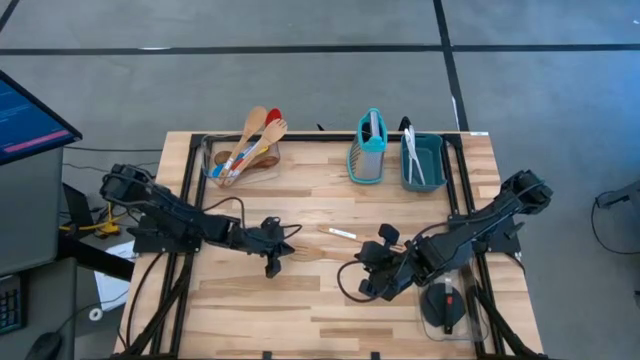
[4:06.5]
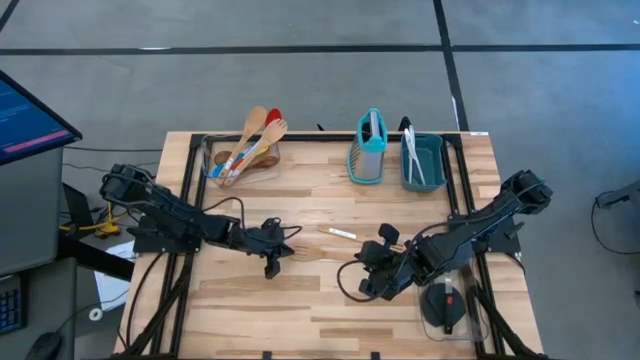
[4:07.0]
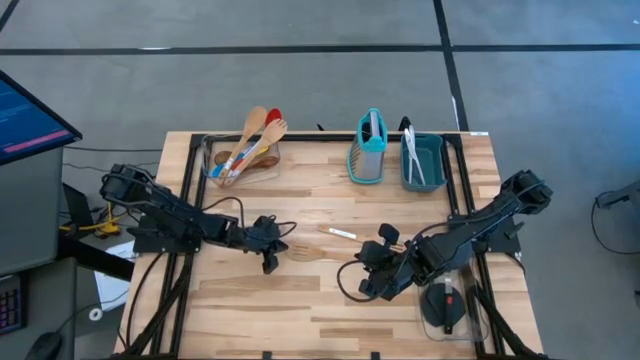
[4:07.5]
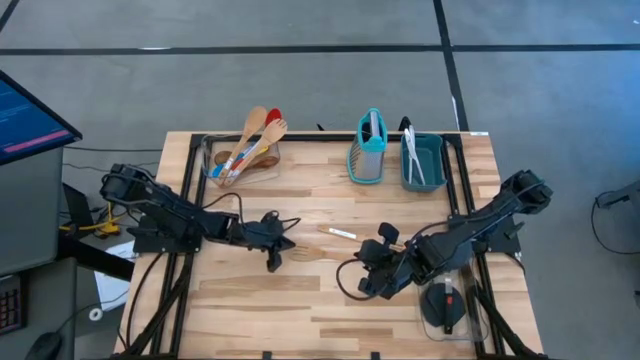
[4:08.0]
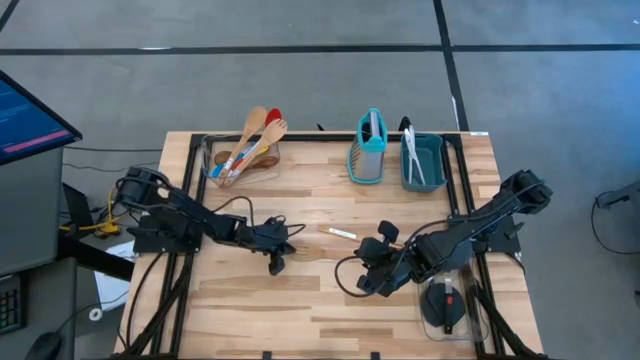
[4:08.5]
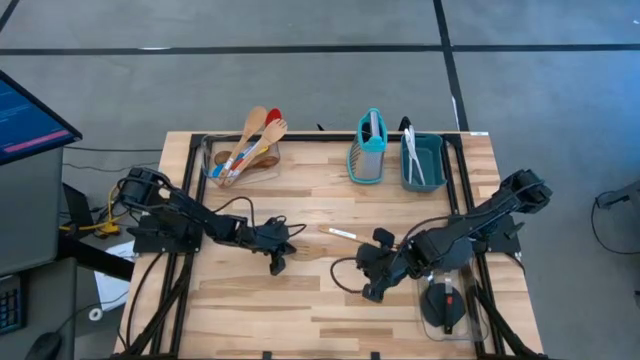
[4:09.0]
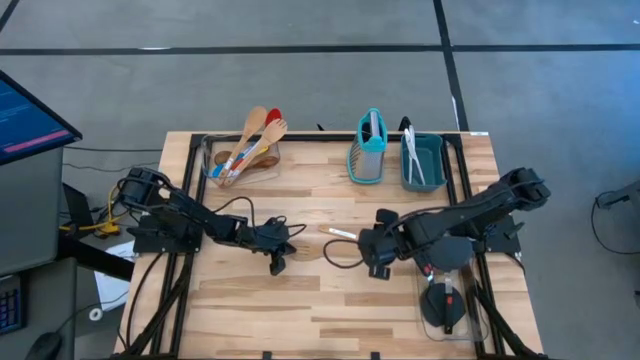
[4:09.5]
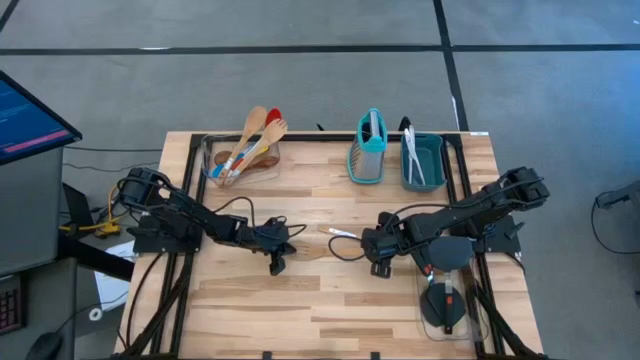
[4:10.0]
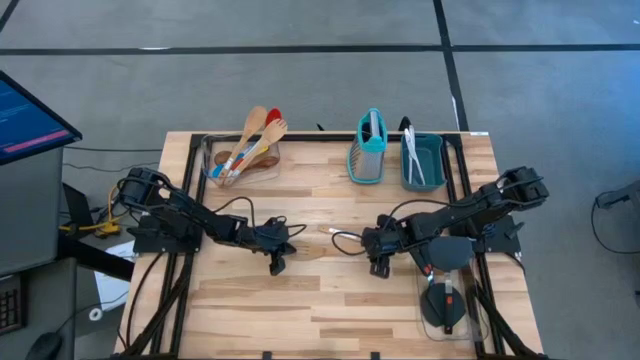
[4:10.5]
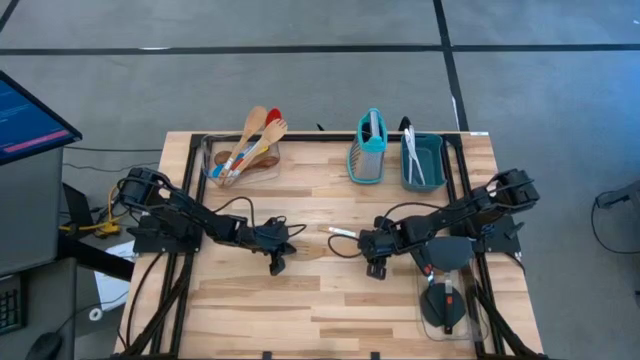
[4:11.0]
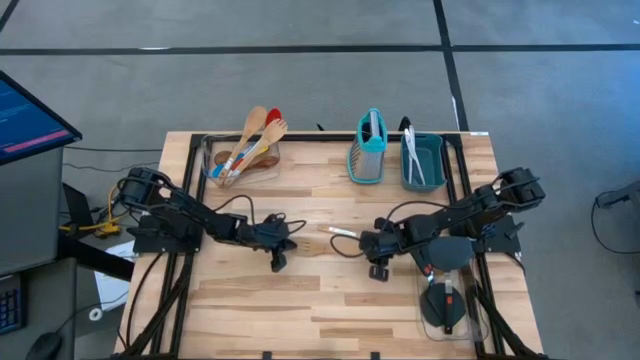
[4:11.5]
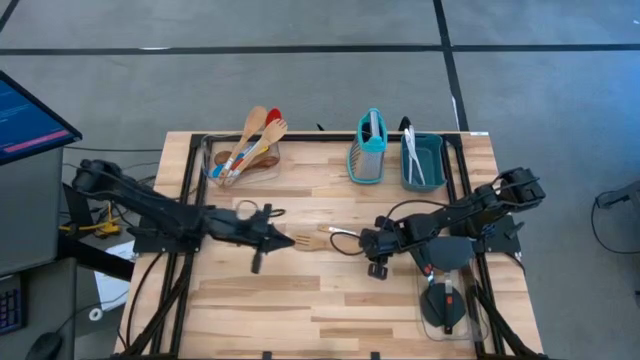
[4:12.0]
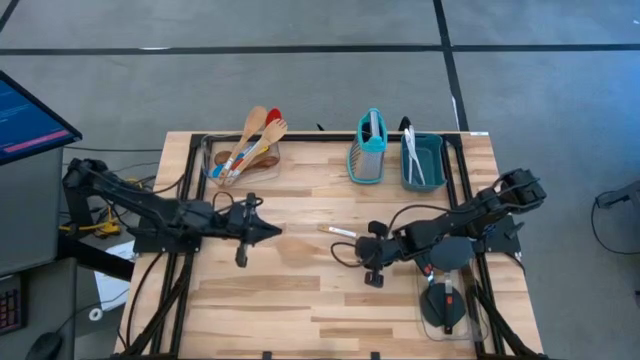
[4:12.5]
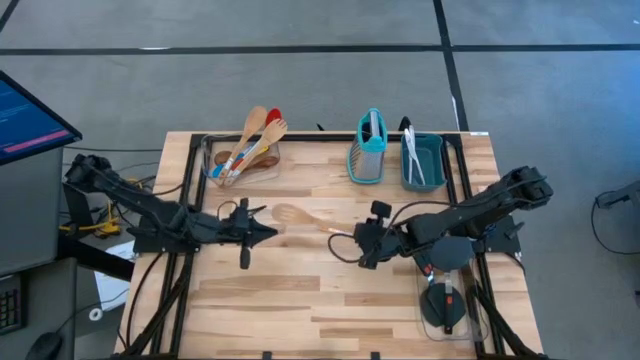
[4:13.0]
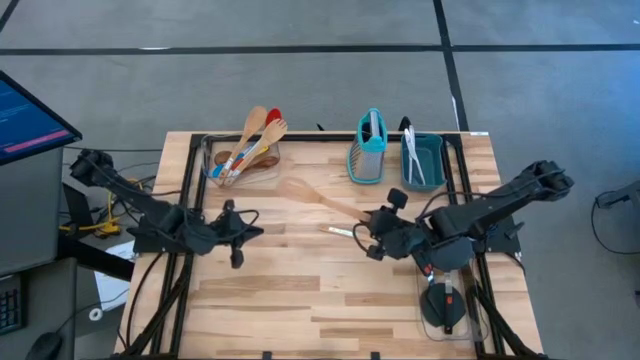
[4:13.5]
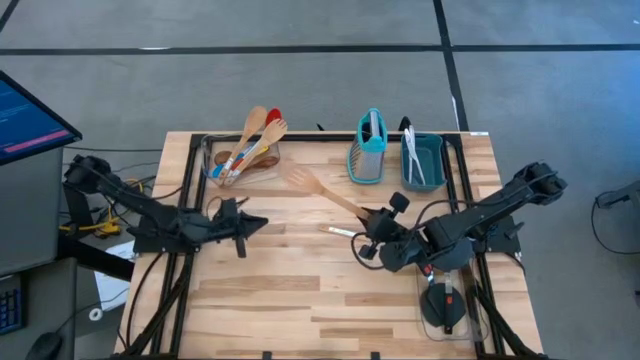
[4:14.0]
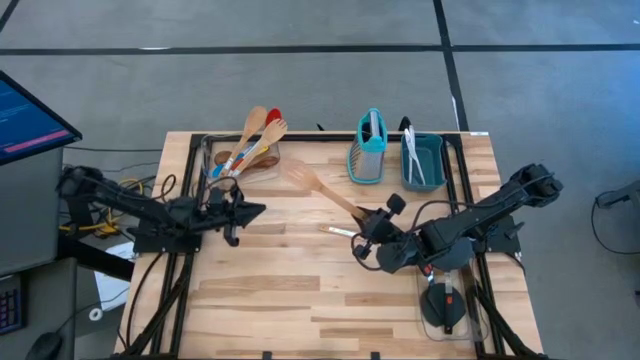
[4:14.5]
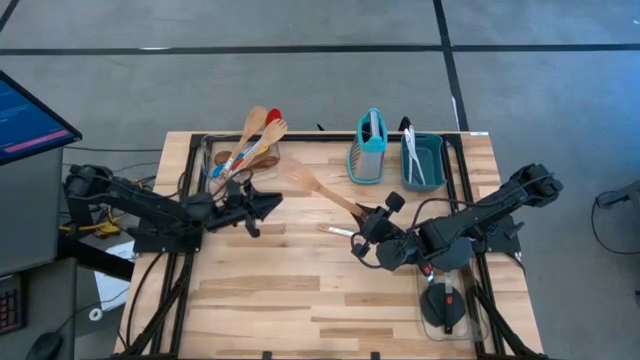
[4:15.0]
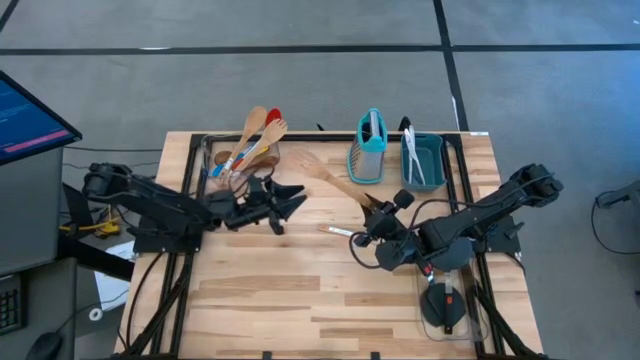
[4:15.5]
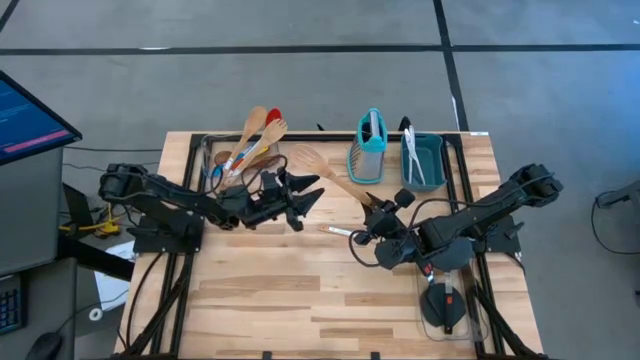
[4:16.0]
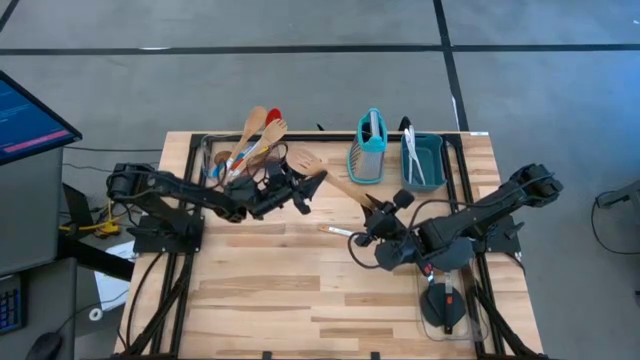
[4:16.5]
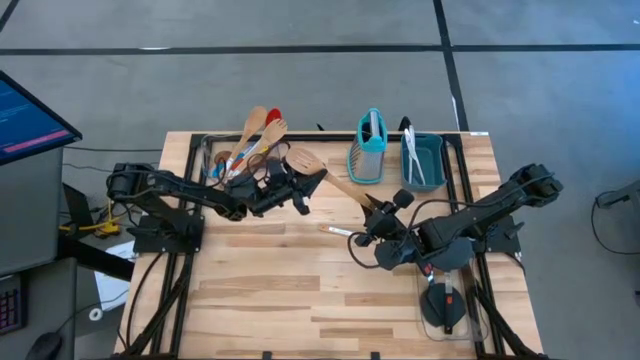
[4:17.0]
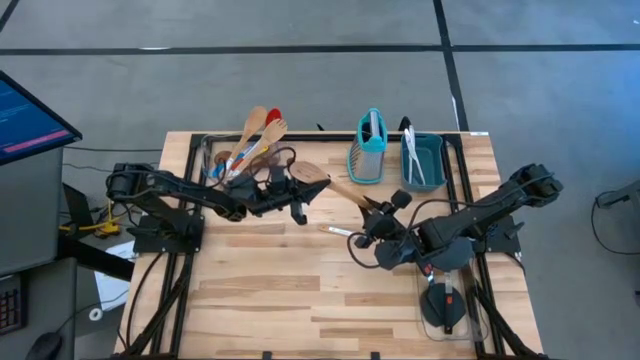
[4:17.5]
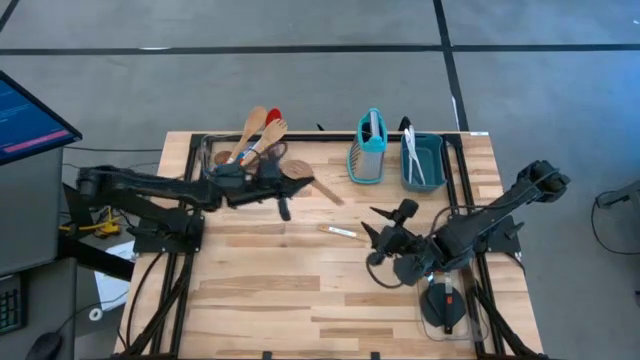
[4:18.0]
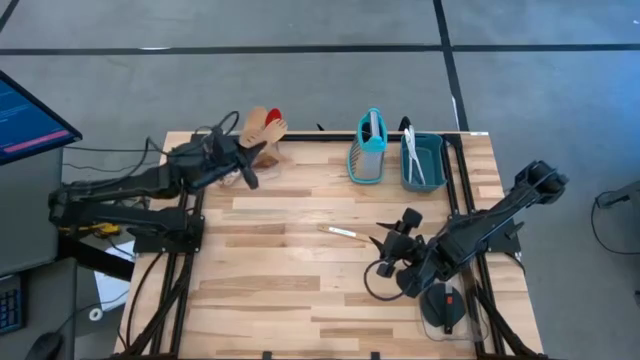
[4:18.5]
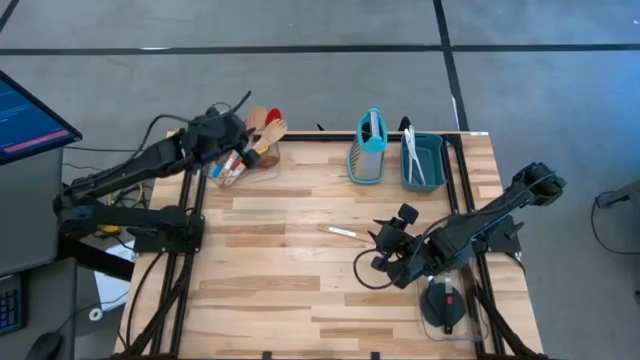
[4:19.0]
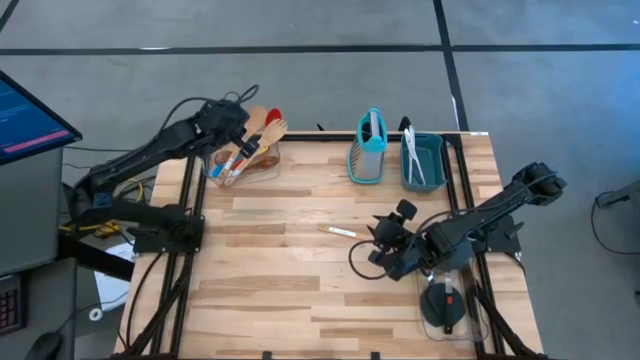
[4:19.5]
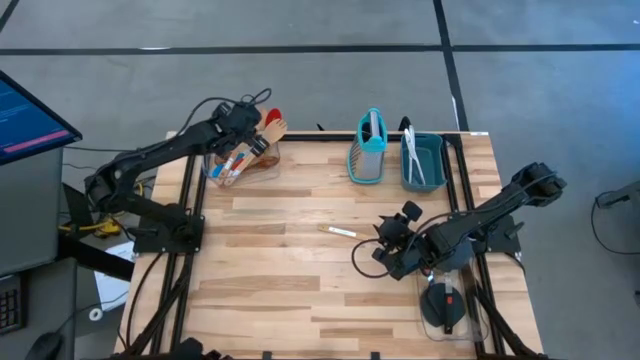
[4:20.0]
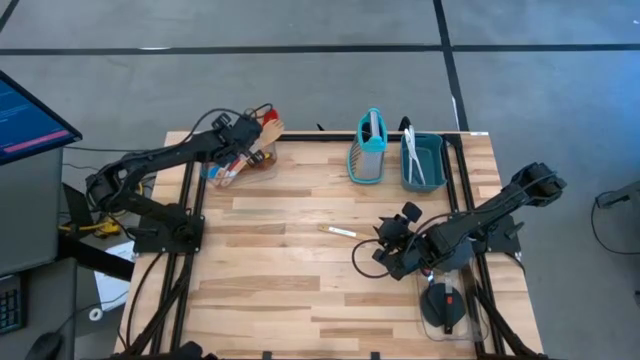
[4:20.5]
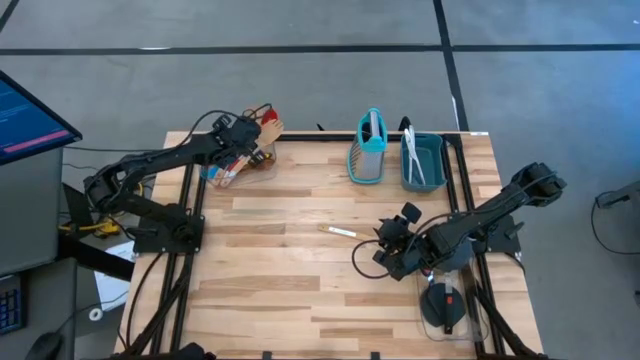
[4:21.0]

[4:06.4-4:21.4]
Task: Pick & Place Kitchen Items
Put the bottom wooden slotted spoon into the left transparent bin

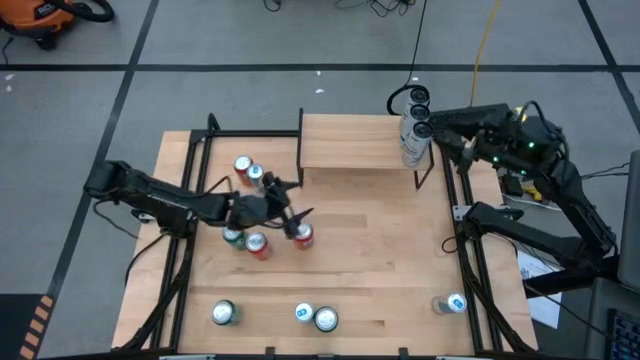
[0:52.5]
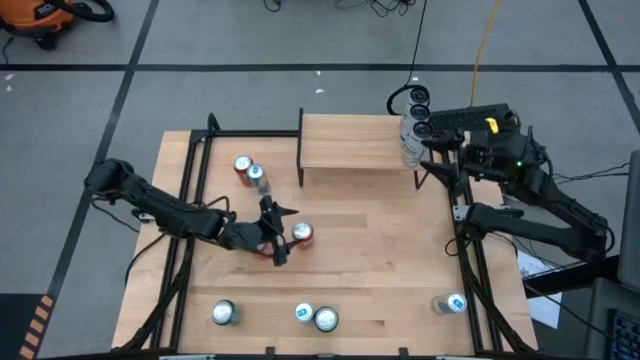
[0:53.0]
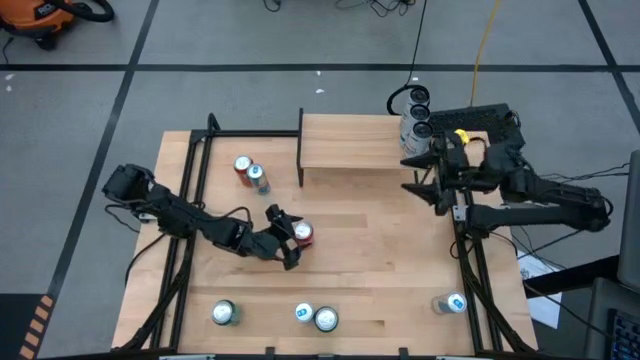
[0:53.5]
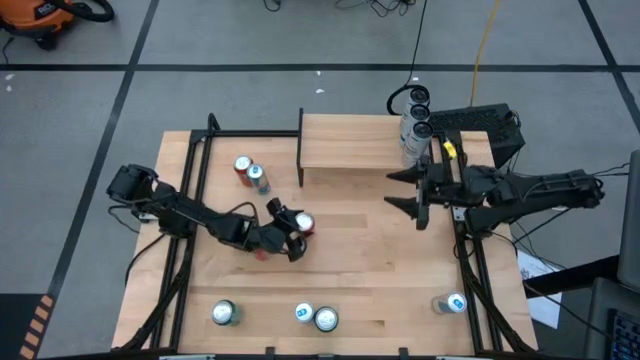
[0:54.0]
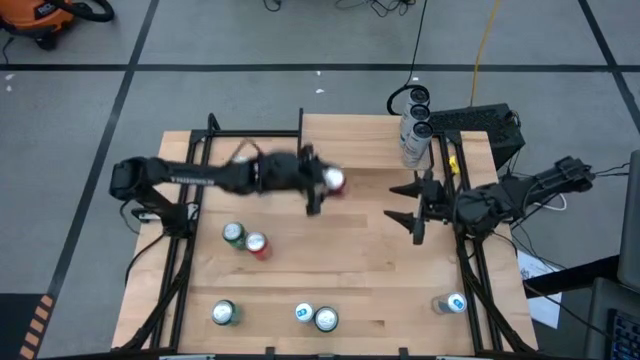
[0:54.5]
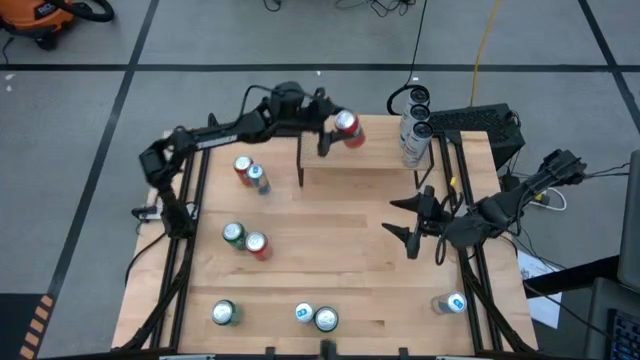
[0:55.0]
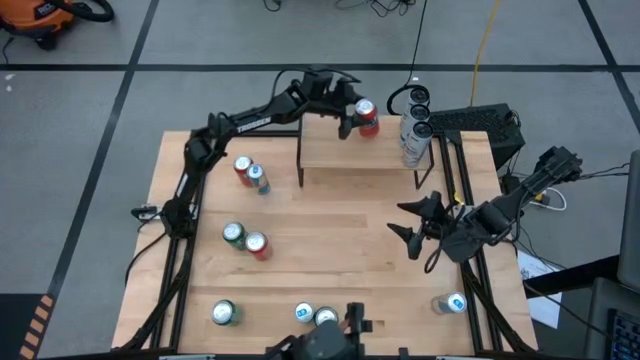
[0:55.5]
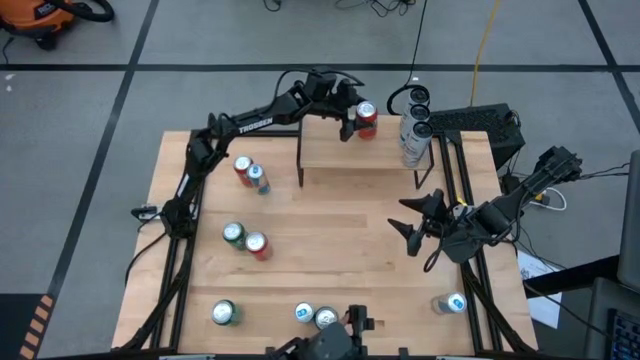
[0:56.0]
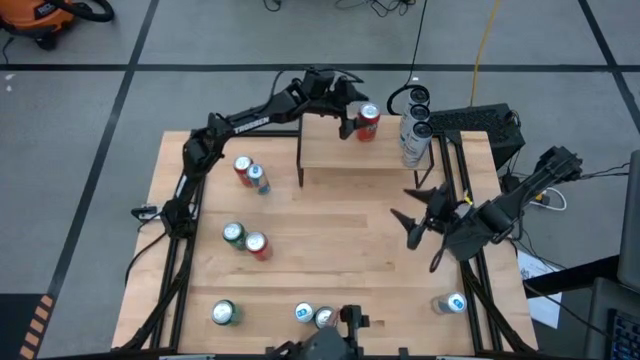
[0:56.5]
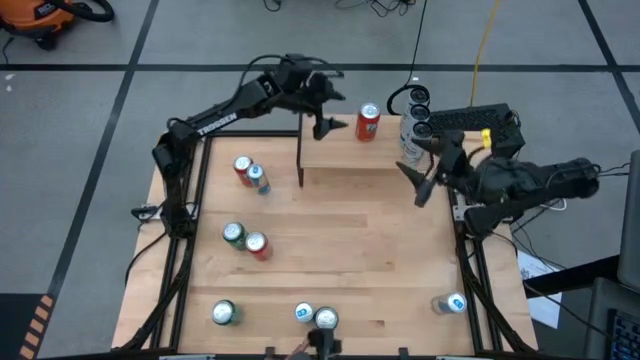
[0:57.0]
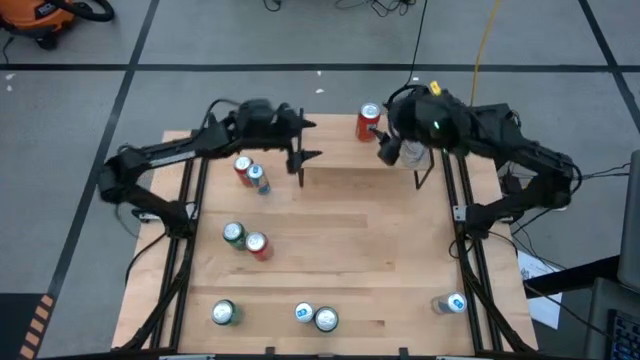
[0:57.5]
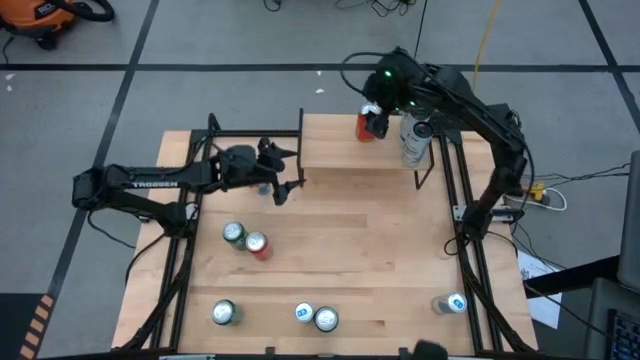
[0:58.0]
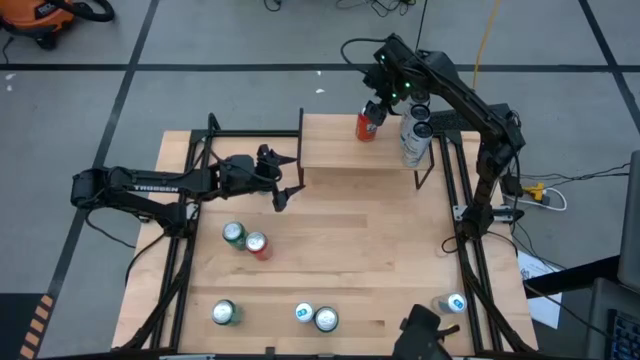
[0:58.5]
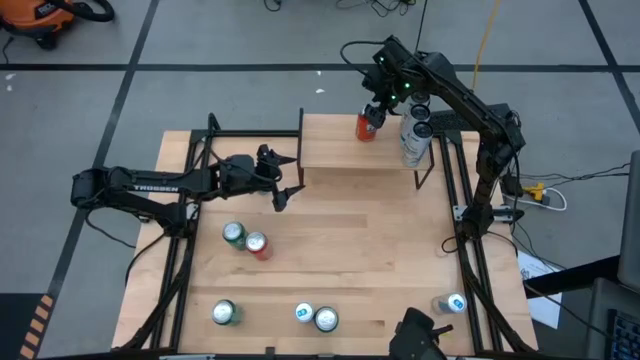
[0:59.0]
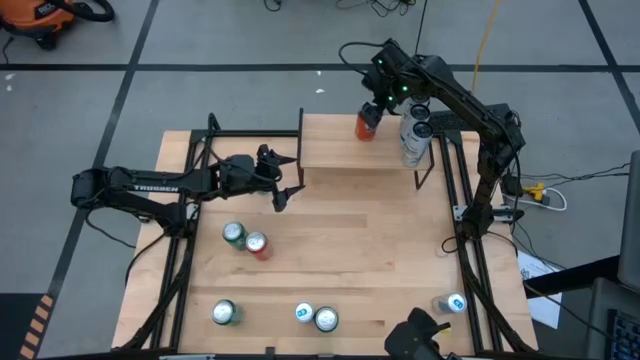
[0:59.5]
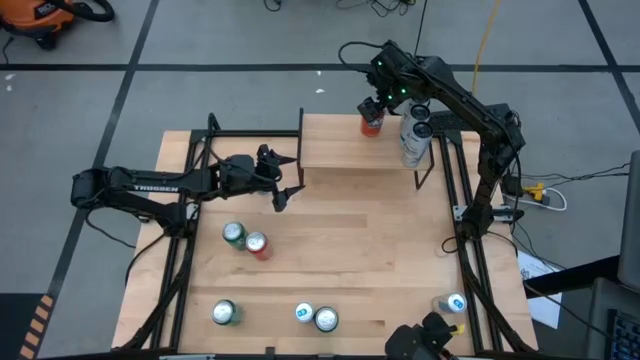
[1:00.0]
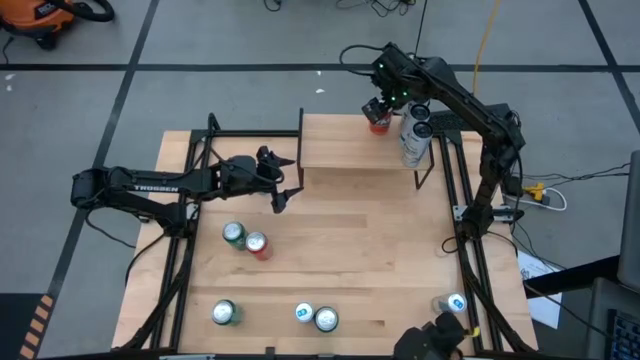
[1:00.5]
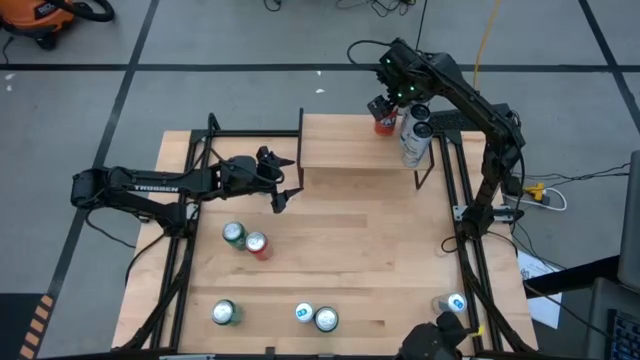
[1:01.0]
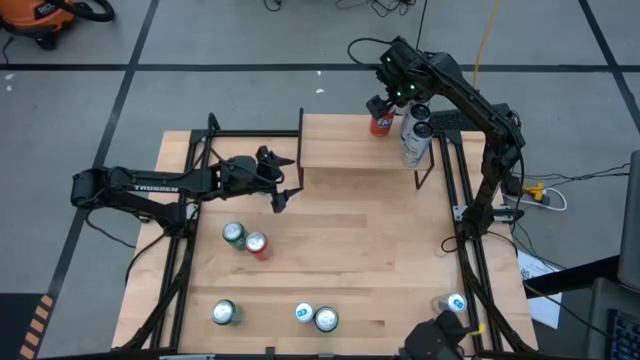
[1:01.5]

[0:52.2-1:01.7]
Task: Place canned beverage on shelf
Put the bottom right red soda can on the shelf
